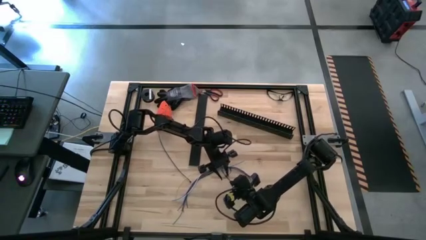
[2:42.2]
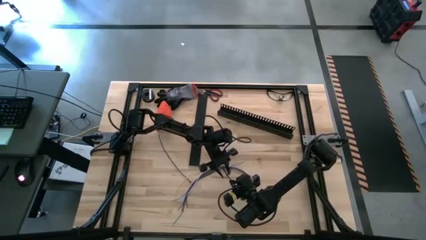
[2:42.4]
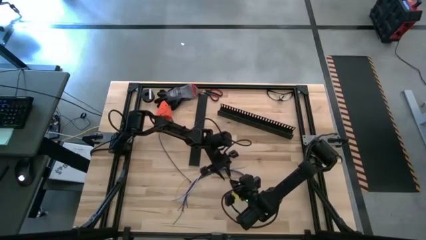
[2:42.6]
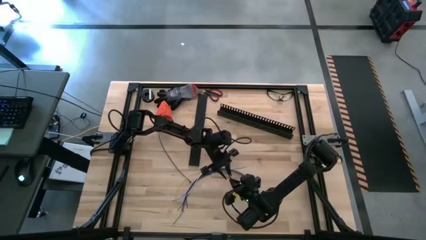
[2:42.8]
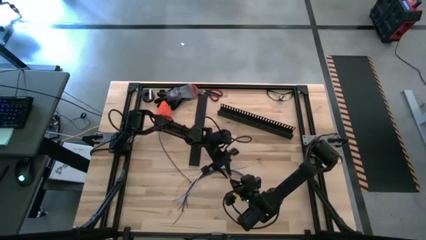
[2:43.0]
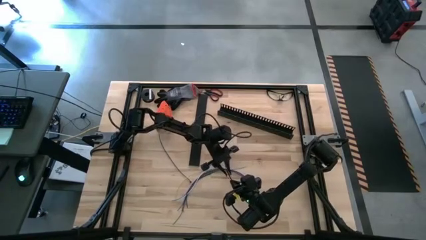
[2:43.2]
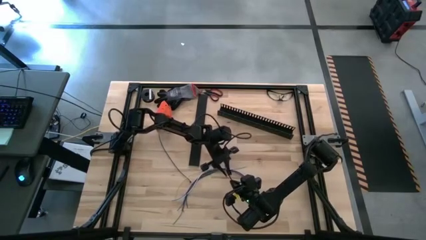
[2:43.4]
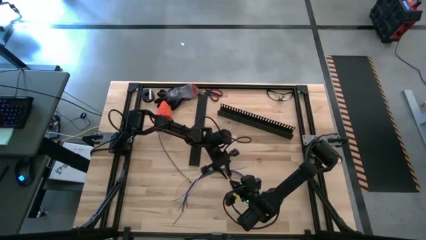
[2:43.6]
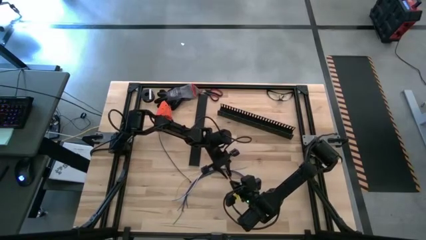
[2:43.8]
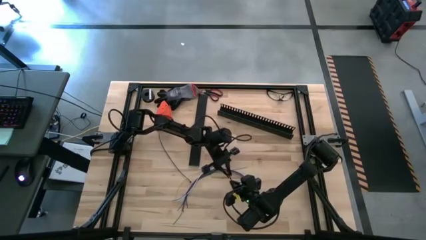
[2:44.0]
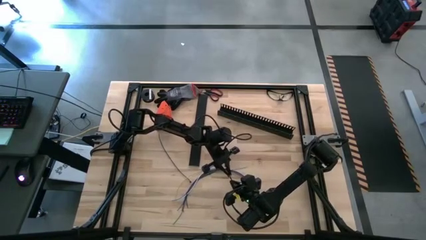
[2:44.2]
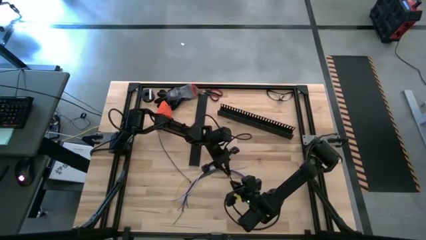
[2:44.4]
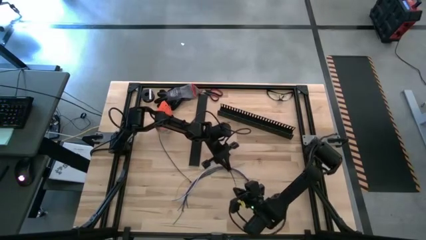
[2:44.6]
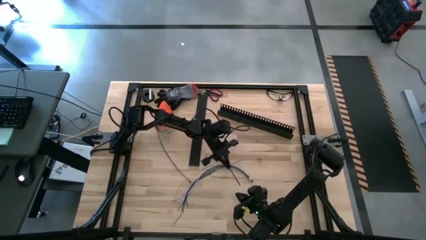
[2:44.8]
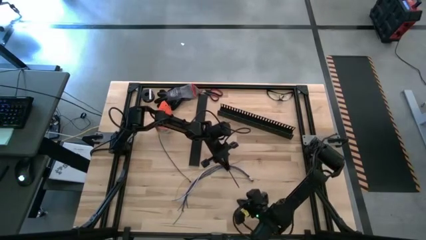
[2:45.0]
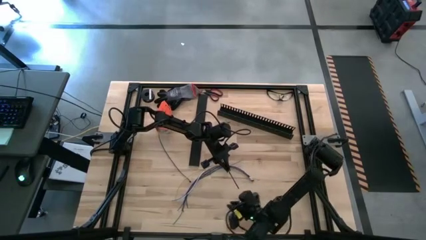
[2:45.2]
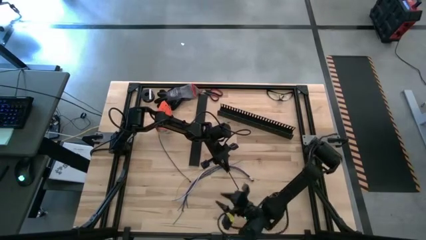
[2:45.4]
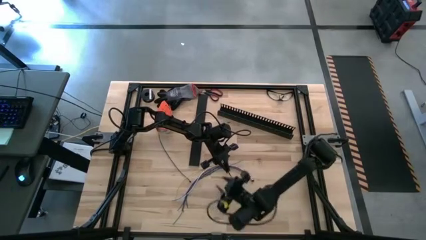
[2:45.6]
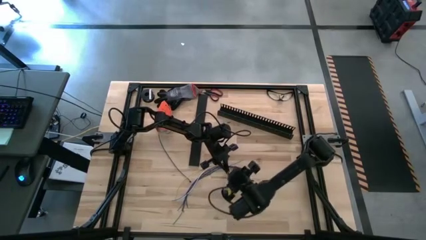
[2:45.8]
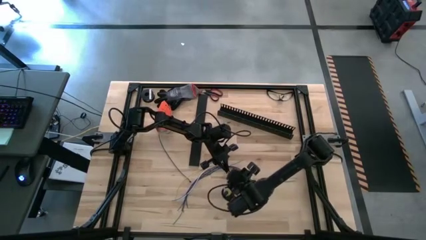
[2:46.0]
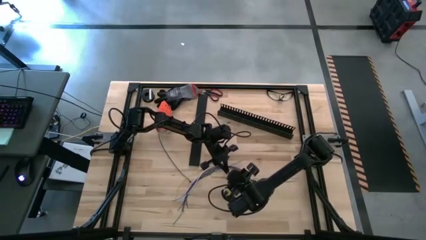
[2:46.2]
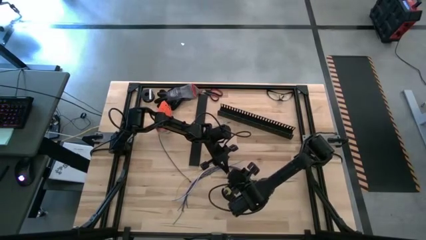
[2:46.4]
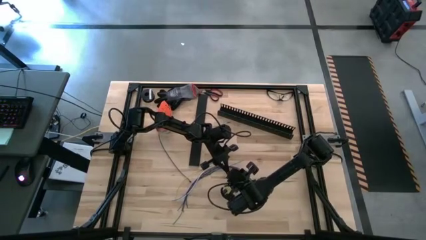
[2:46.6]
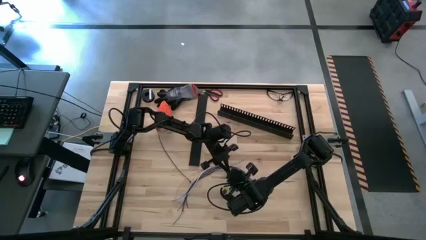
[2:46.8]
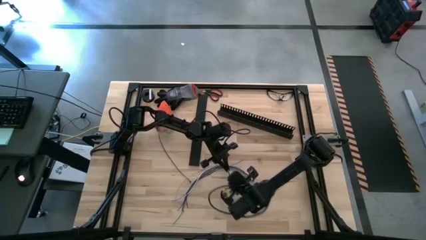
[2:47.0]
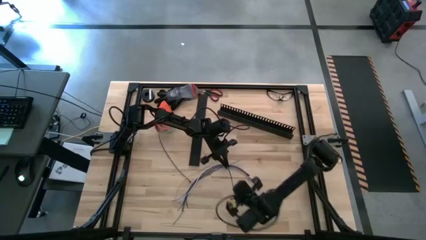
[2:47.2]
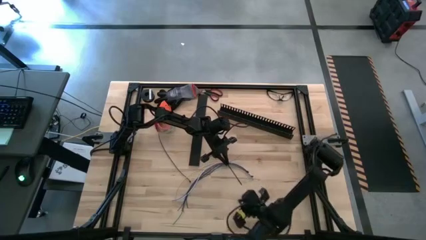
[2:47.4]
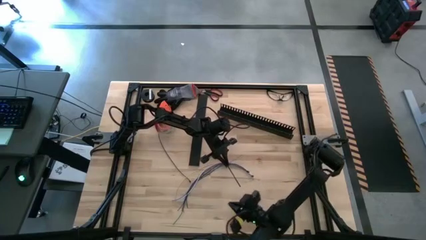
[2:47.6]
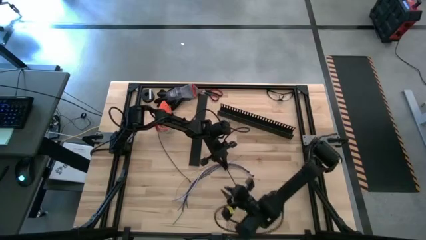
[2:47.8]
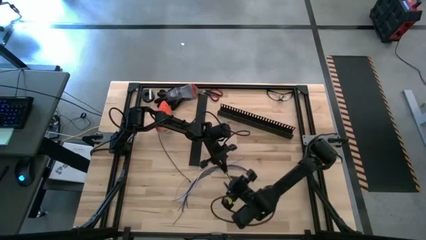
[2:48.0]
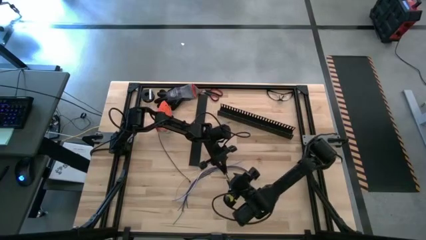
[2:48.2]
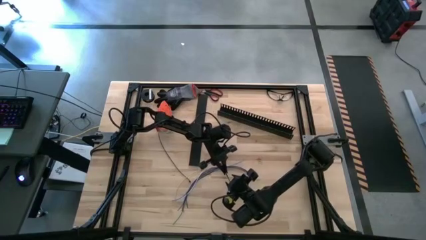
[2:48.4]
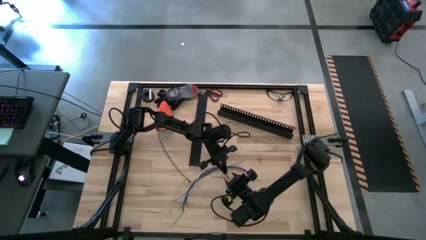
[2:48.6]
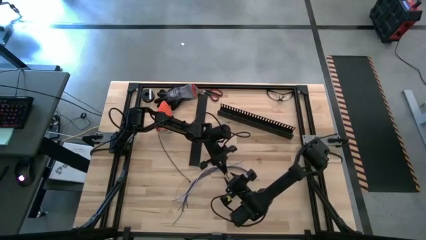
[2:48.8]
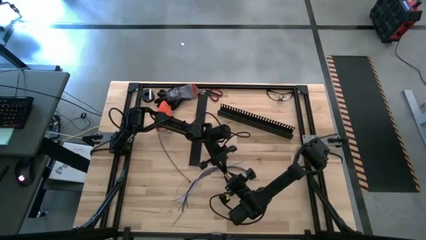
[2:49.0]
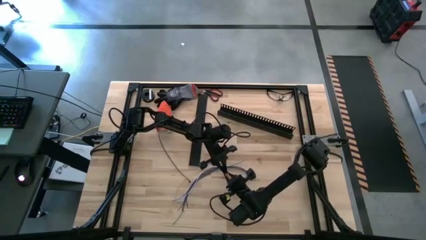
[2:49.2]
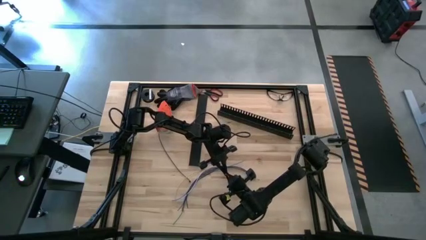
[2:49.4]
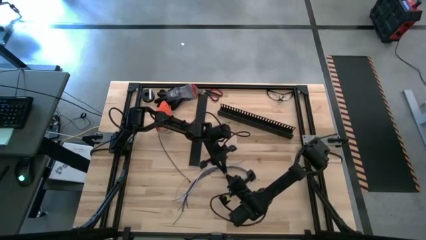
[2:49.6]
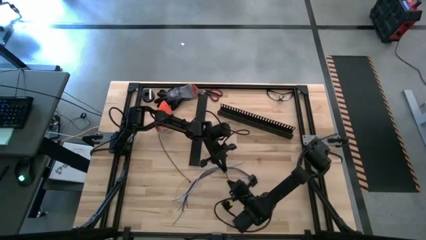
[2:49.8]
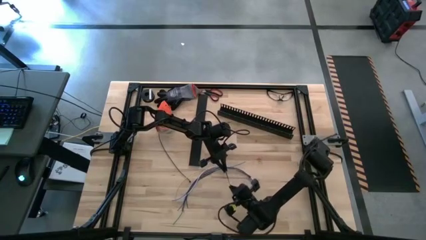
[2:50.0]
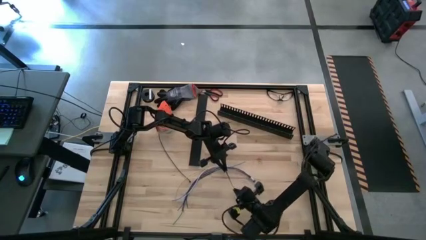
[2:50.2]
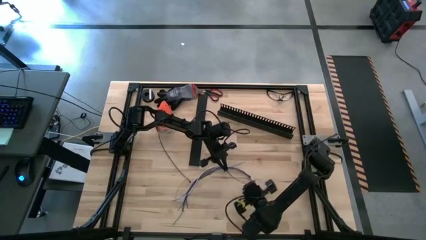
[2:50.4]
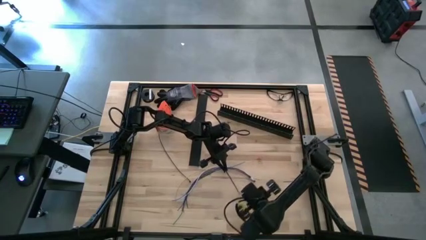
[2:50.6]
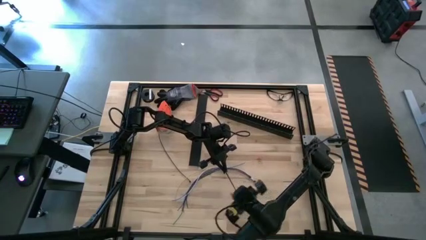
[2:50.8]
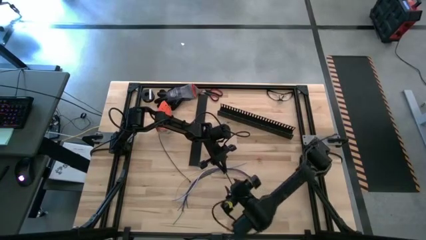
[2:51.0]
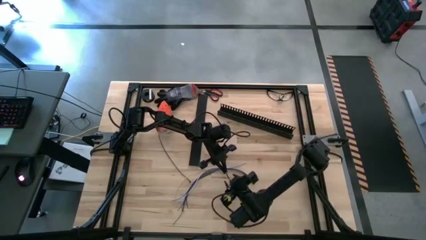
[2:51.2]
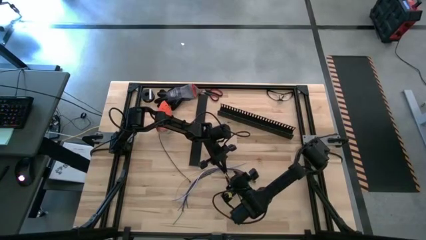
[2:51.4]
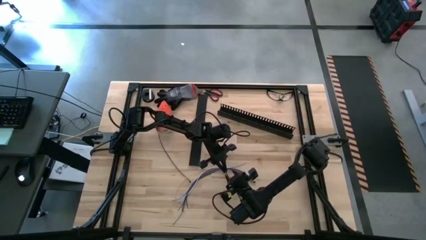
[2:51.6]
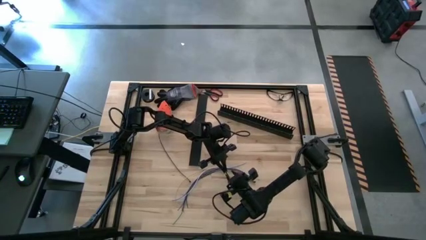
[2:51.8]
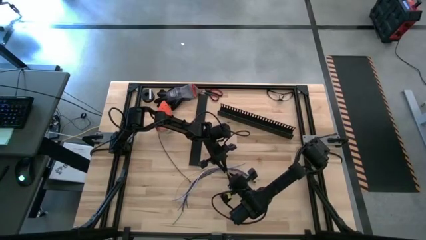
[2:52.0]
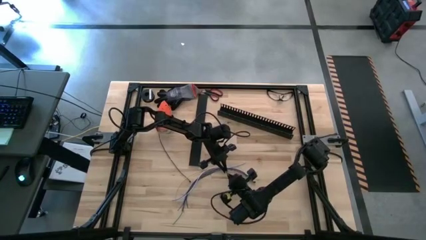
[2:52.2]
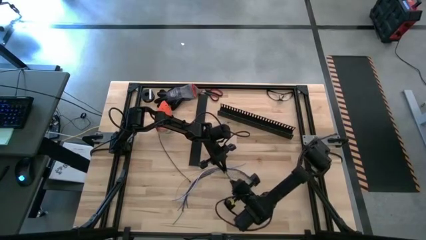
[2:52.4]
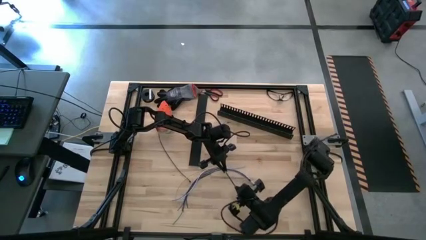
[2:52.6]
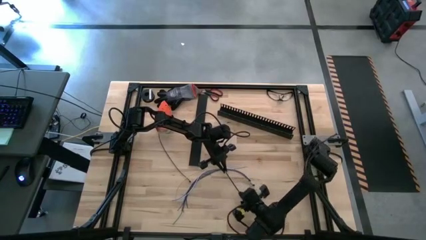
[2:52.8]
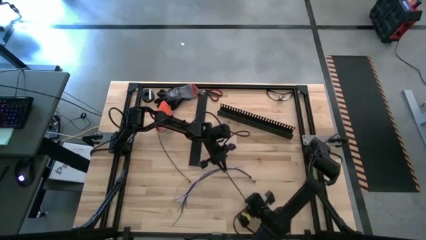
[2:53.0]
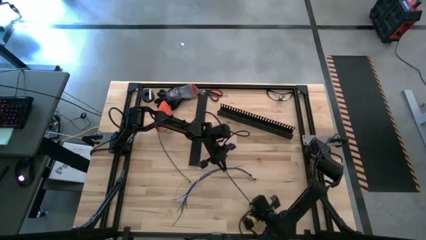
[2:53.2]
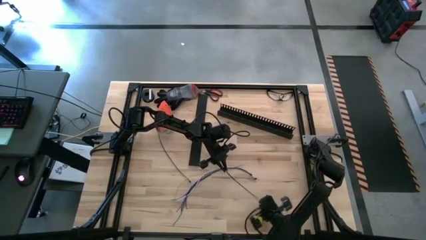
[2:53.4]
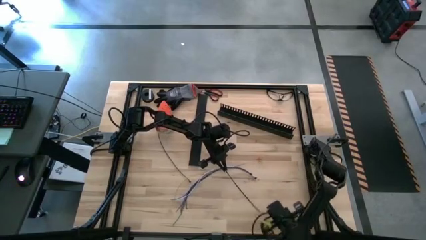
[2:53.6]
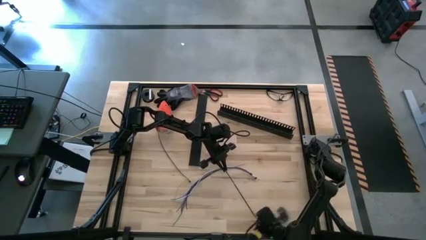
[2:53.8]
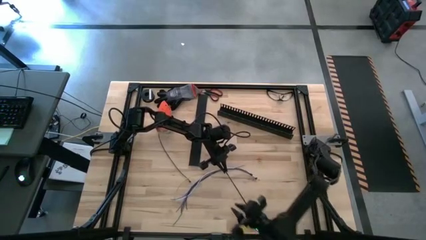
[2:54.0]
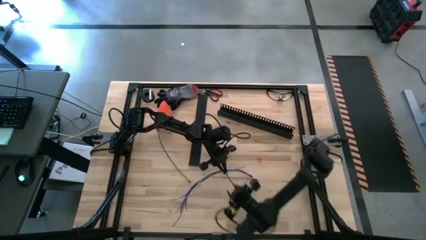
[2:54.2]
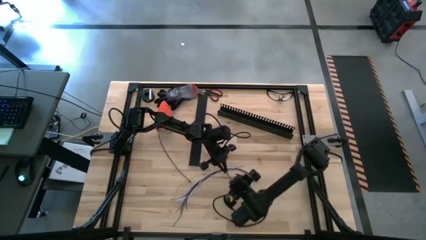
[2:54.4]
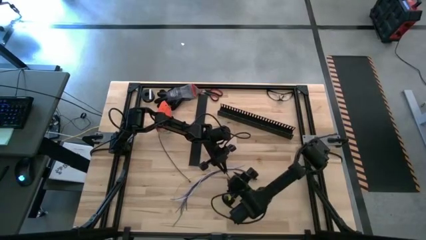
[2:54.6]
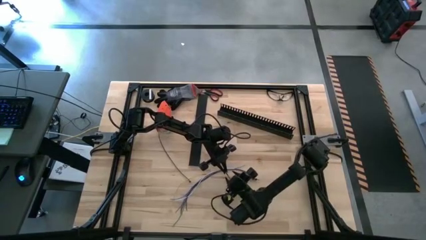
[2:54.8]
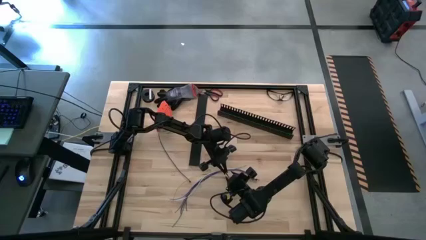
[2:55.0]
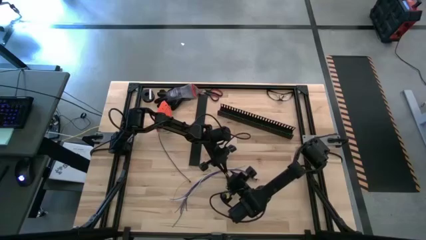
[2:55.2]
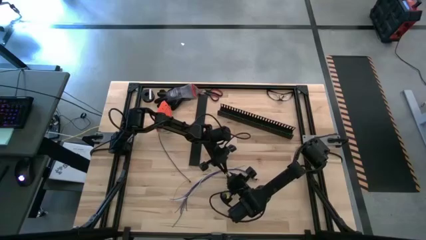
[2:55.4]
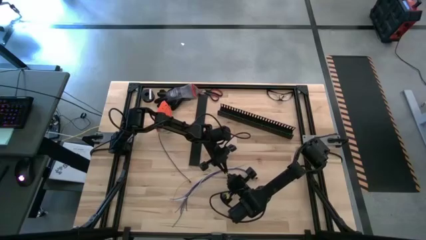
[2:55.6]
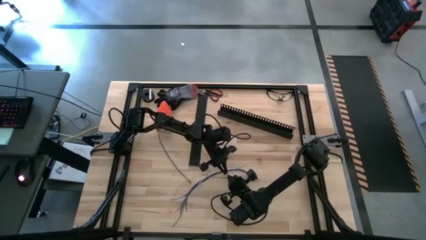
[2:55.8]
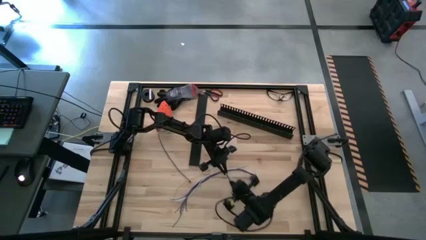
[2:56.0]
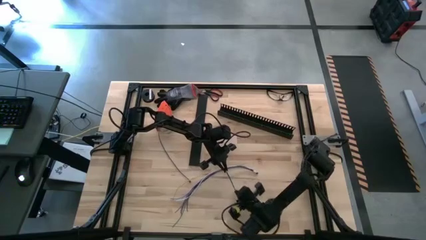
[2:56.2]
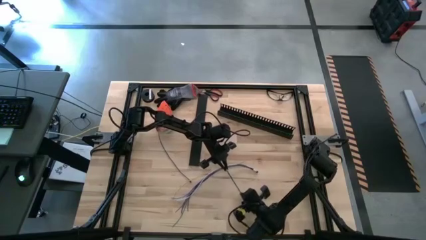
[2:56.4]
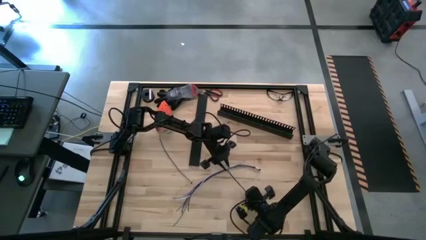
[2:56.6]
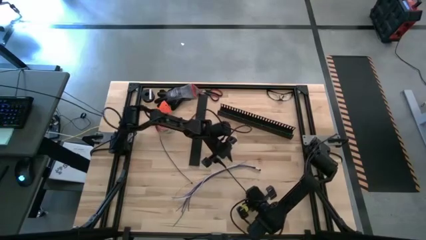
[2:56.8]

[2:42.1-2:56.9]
Task: Ziptie cables
Wrap the black zip tie on the cables
